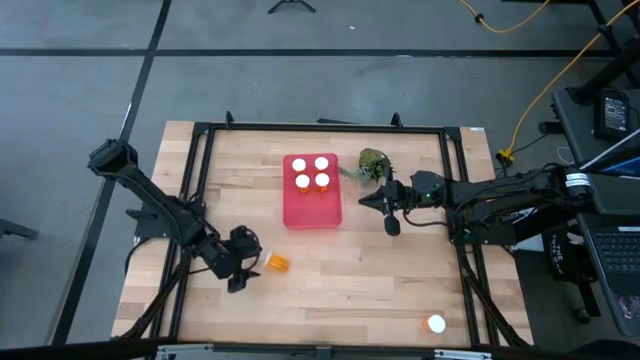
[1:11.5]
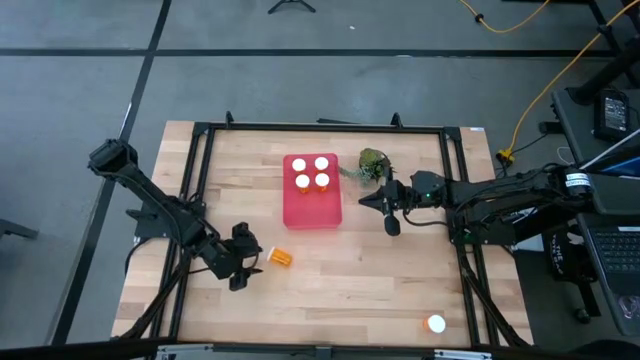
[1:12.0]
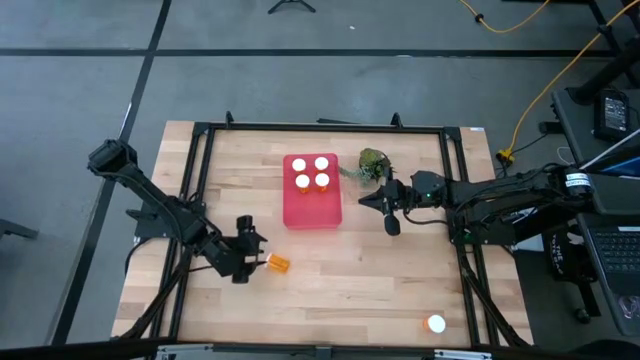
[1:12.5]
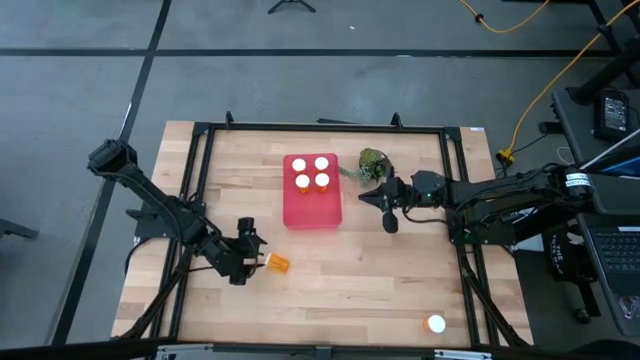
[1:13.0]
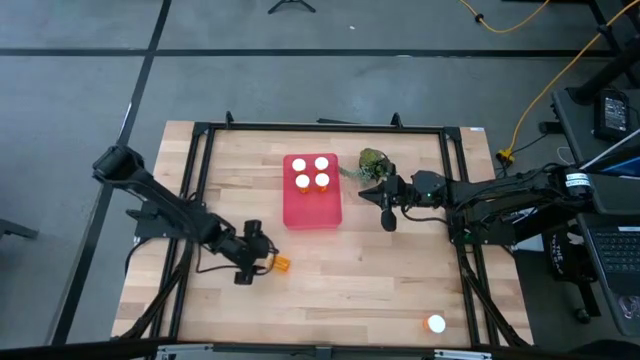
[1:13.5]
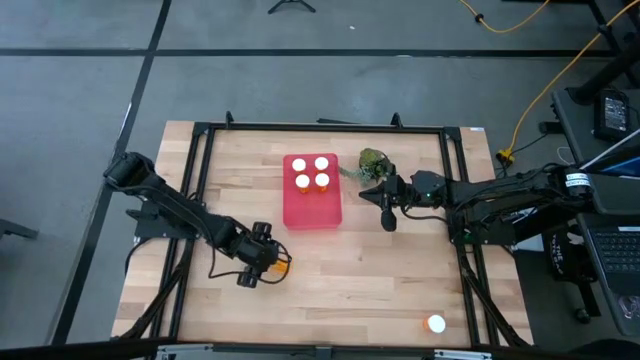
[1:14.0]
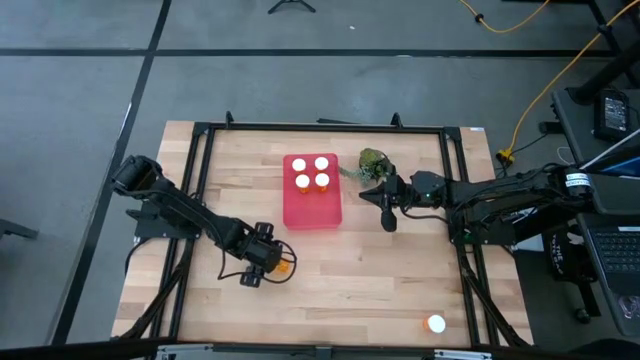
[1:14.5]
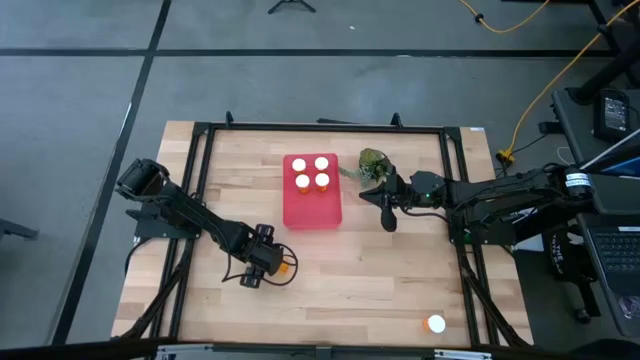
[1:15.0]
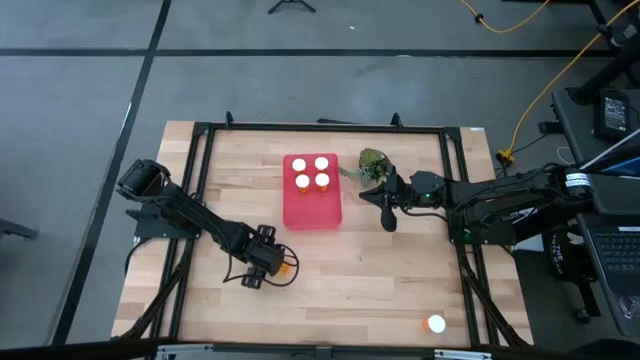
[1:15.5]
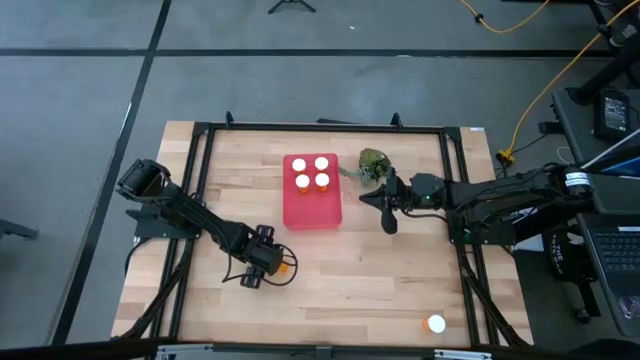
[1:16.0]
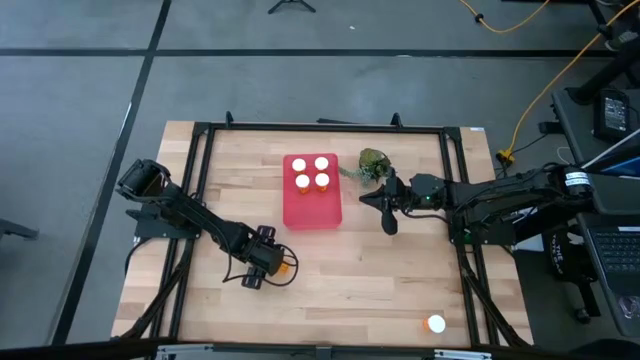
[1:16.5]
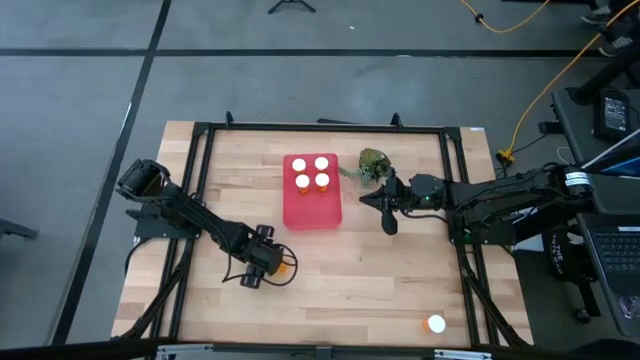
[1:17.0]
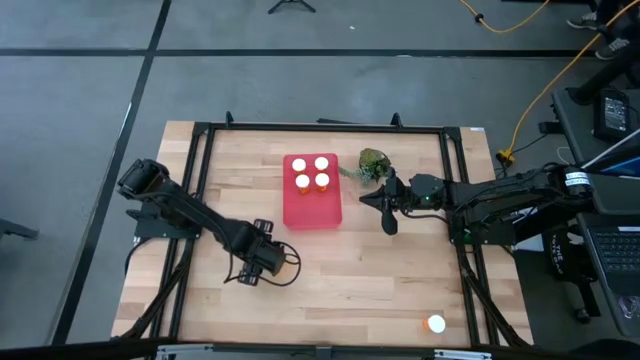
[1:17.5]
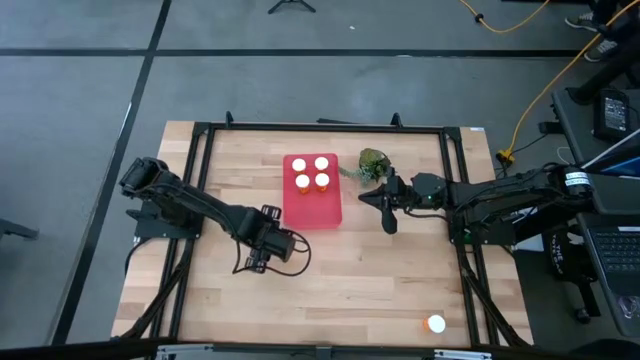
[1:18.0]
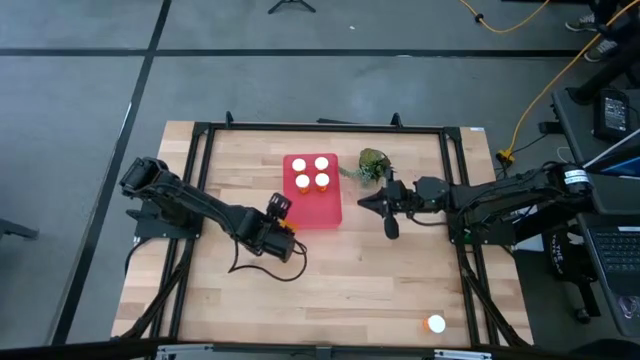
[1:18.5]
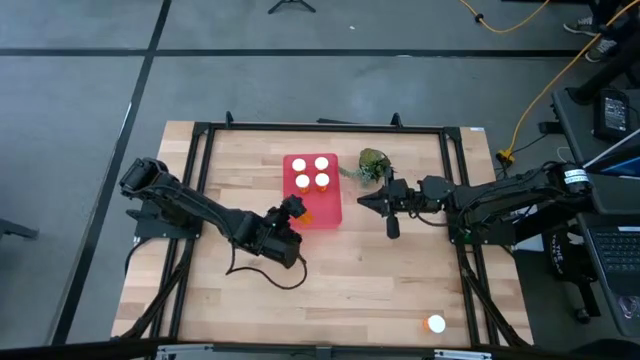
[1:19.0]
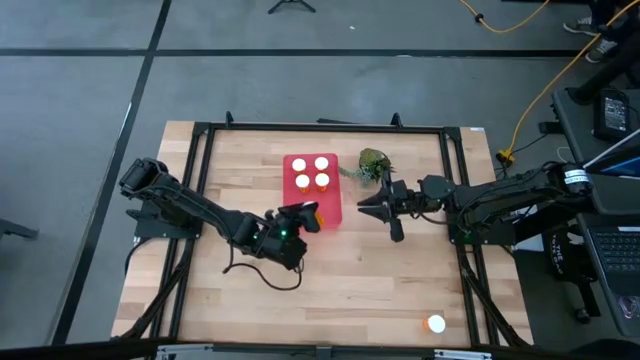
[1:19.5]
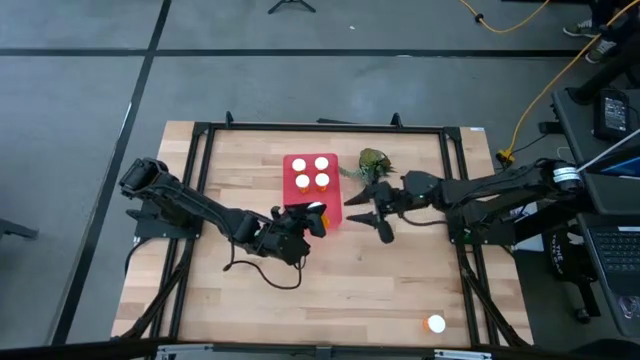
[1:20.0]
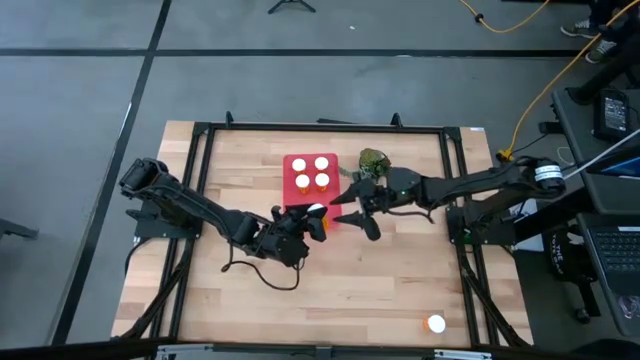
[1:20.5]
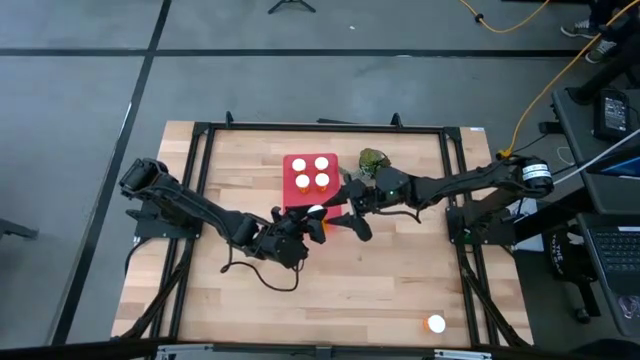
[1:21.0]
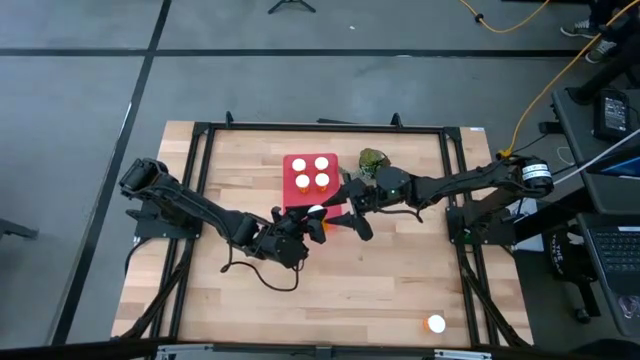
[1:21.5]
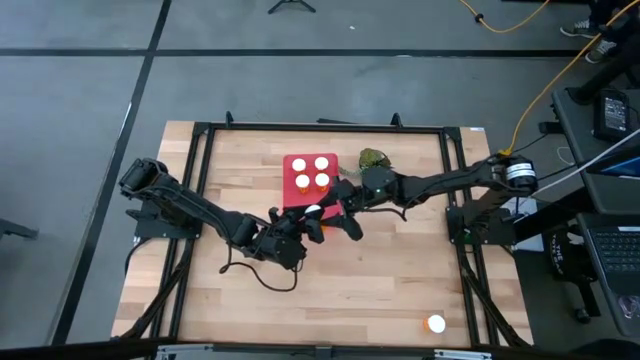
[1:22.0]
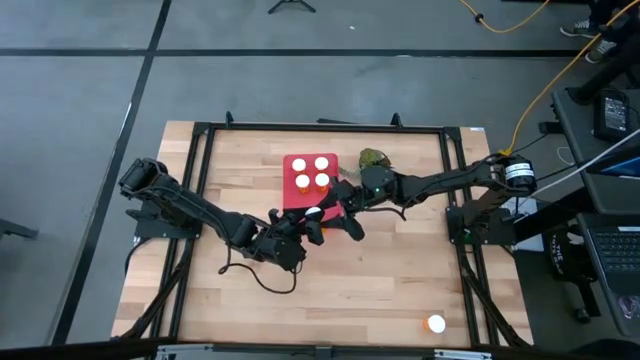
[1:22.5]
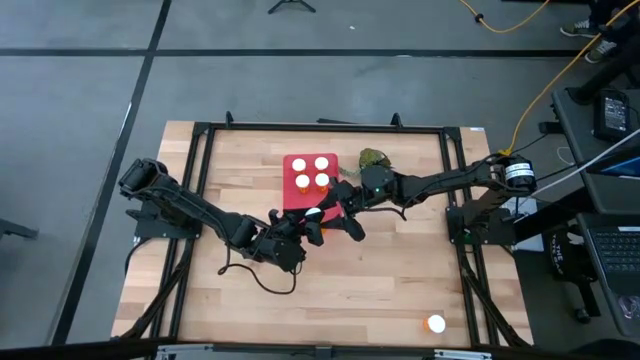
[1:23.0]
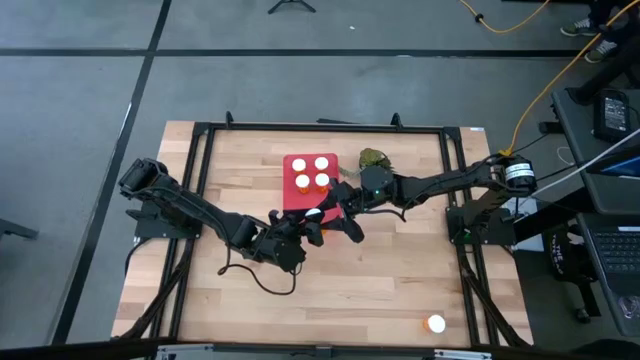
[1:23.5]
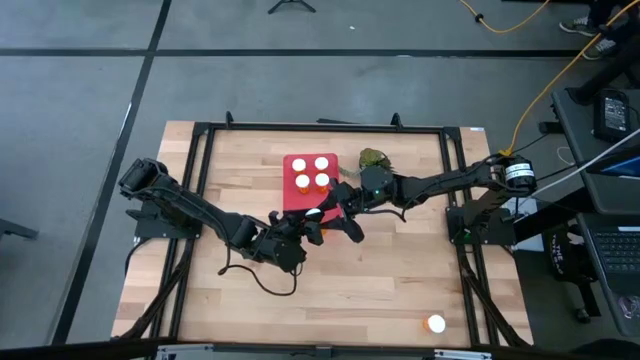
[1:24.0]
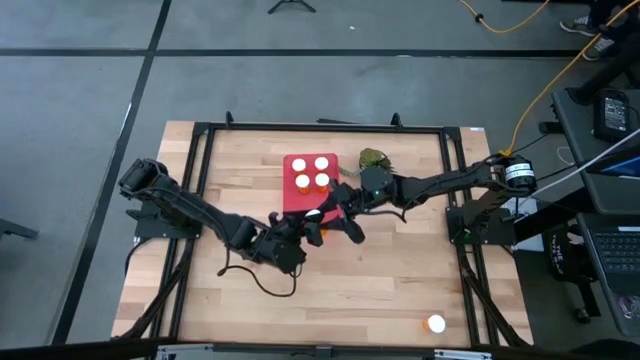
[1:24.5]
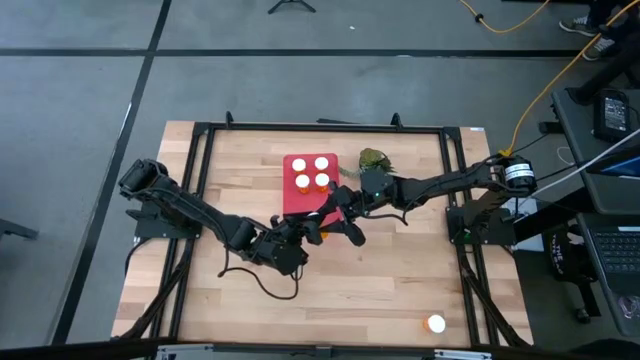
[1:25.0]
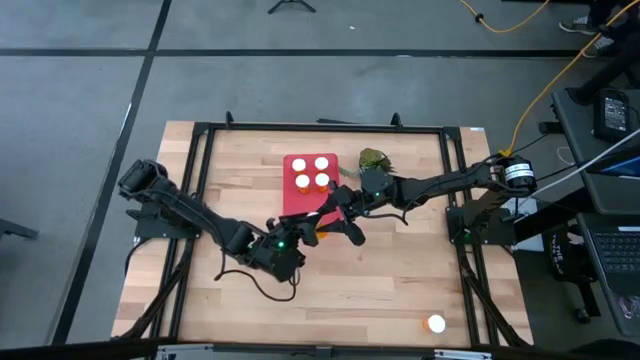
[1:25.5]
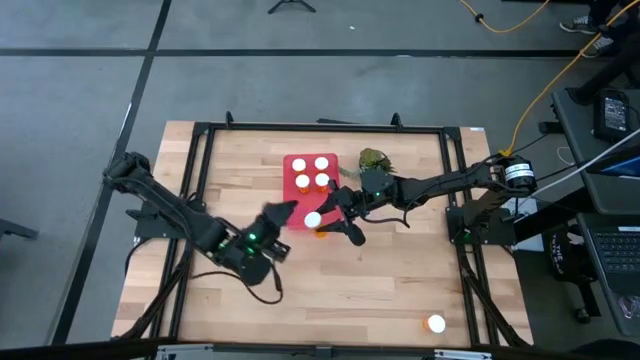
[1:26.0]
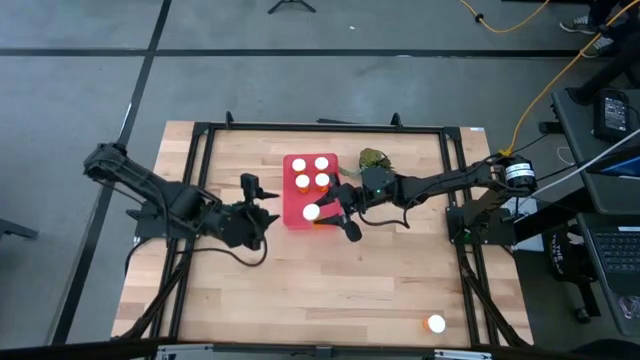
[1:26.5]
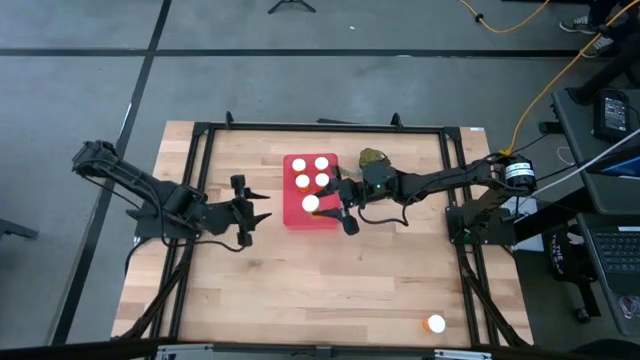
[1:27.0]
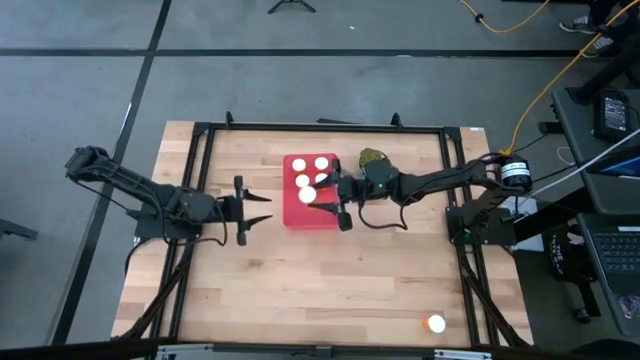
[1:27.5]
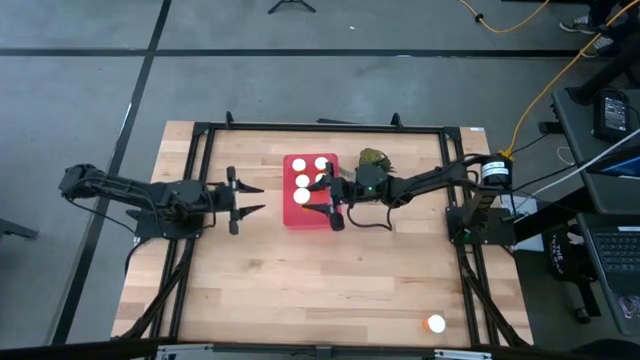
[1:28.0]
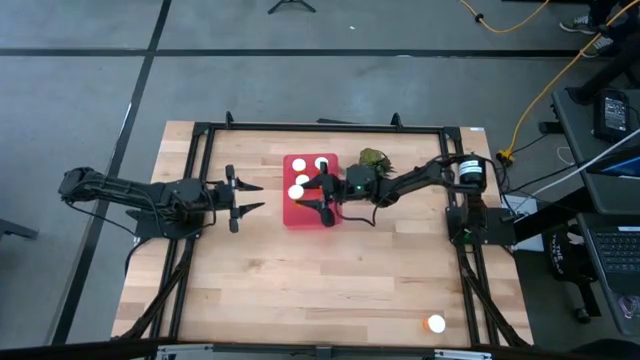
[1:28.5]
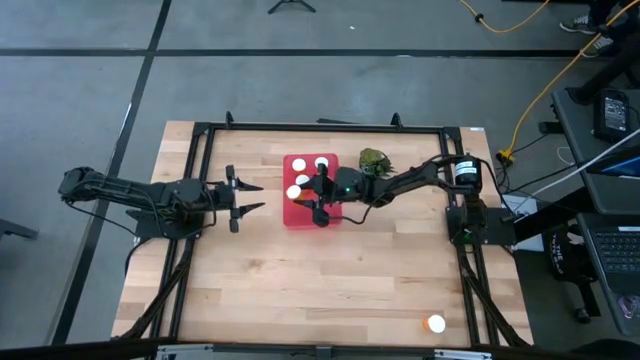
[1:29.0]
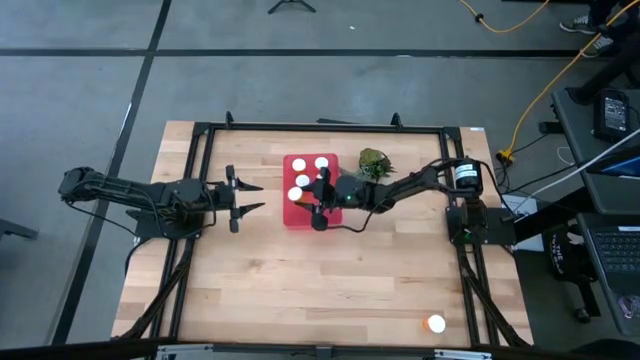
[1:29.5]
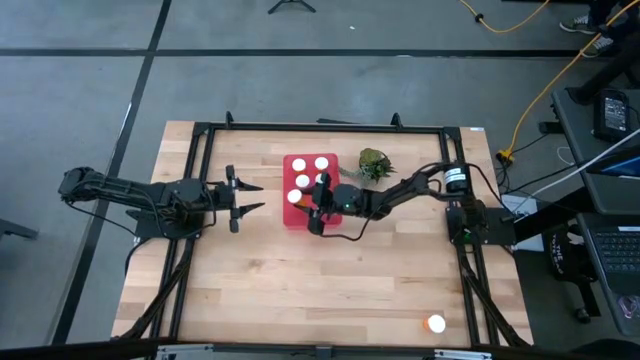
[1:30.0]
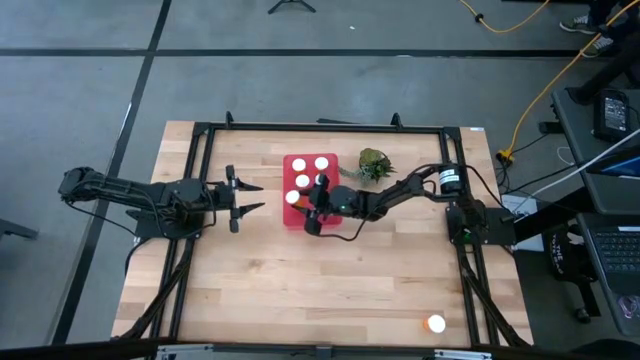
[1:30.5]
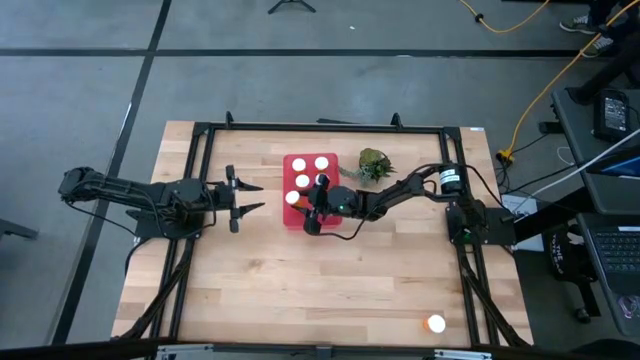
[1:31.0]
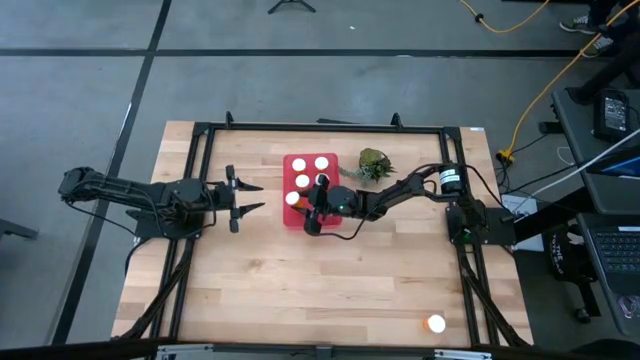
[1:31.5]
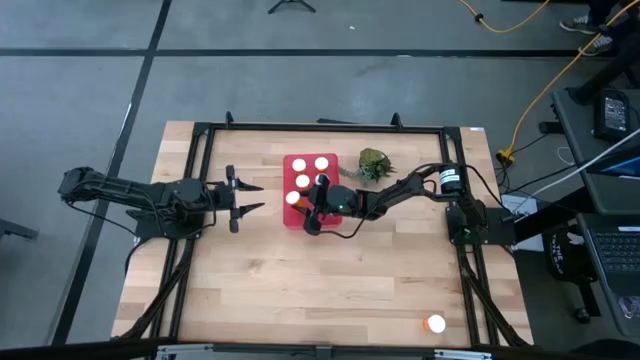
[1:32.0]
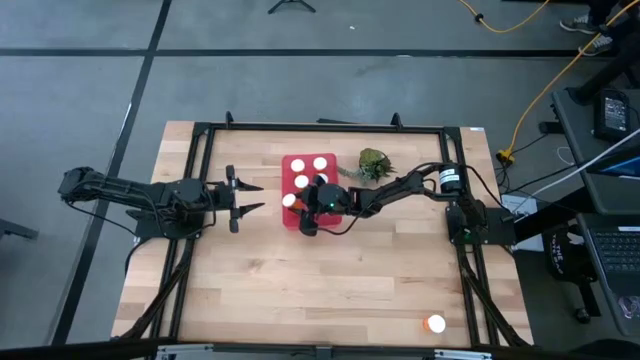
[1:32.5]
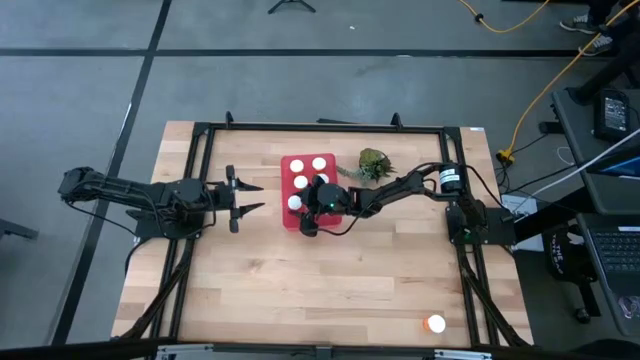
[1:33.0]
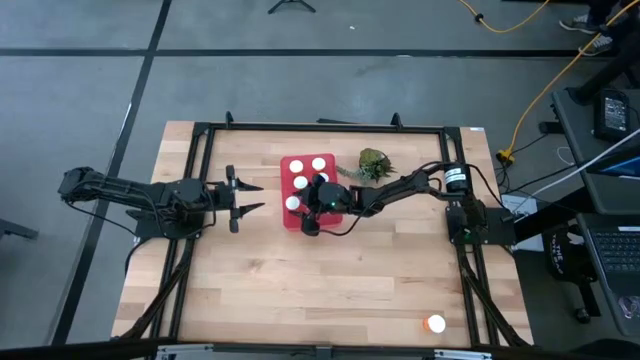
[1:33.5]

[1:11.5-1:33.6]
Task: Pick and place pill bottles into a basket
Put the orange pill bottle into the red bin
